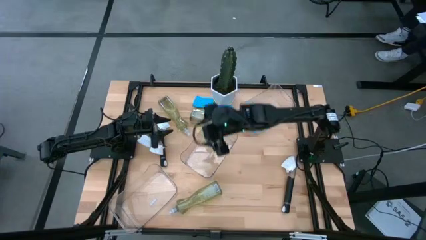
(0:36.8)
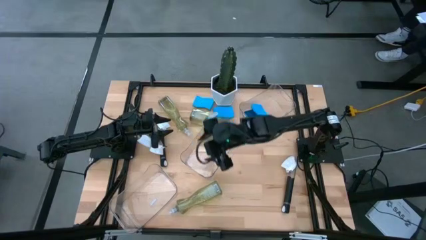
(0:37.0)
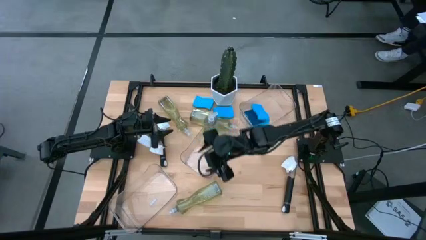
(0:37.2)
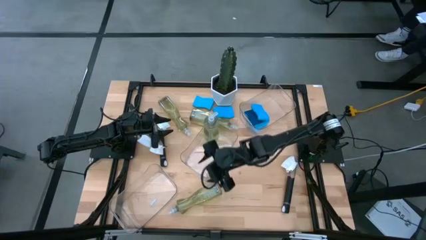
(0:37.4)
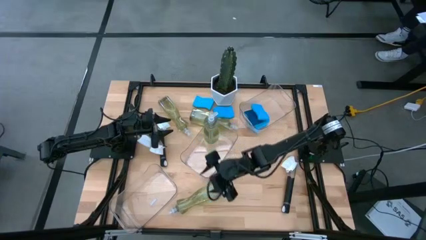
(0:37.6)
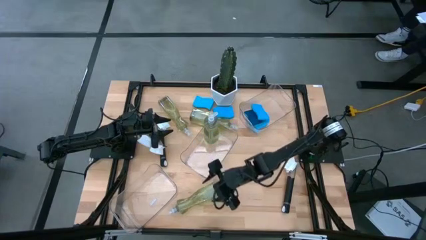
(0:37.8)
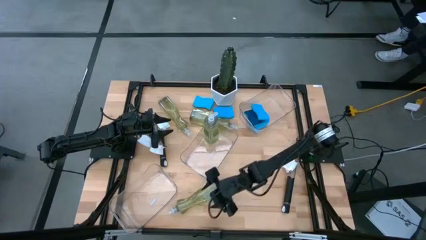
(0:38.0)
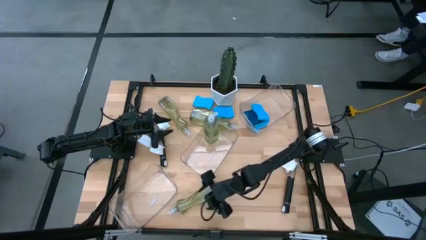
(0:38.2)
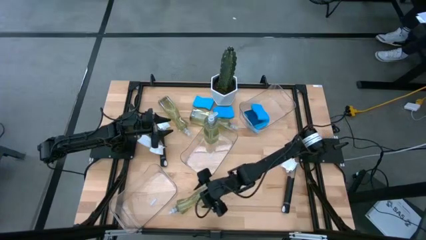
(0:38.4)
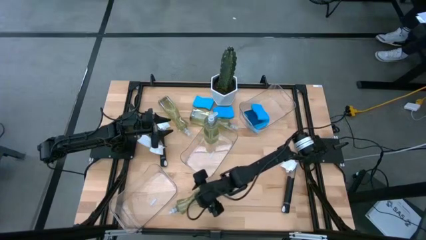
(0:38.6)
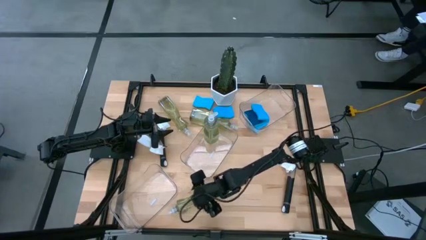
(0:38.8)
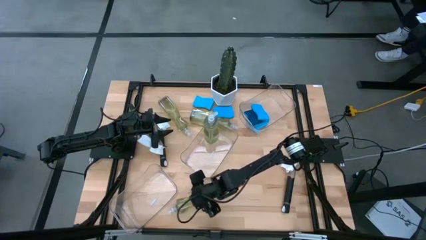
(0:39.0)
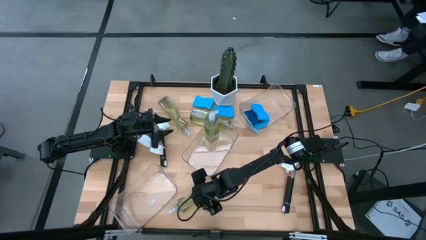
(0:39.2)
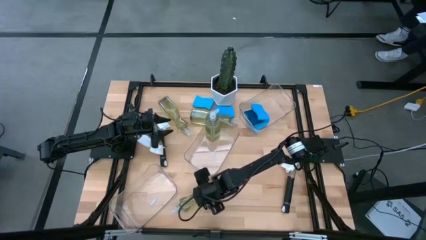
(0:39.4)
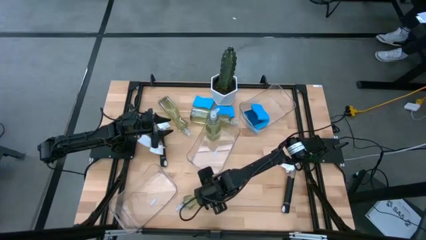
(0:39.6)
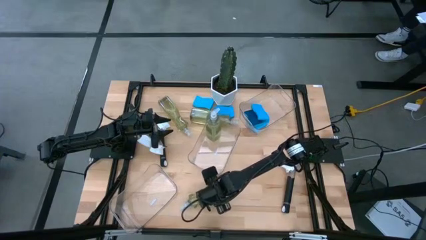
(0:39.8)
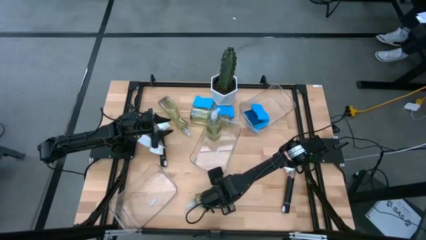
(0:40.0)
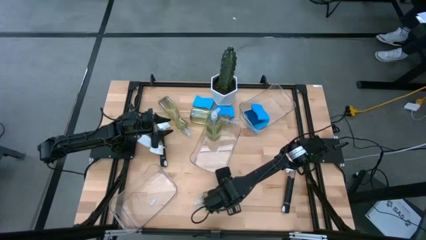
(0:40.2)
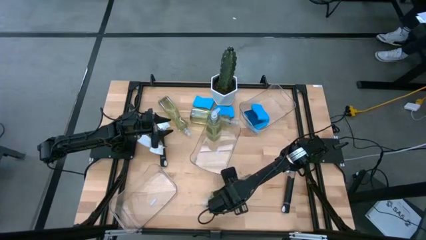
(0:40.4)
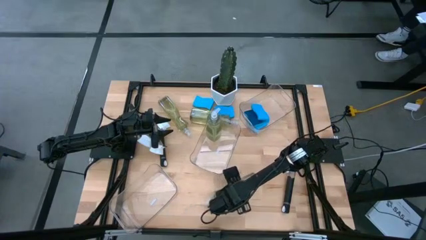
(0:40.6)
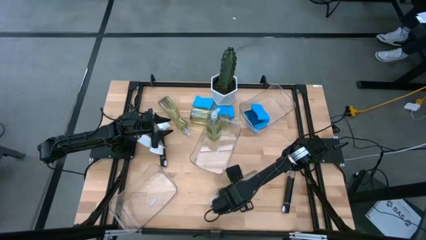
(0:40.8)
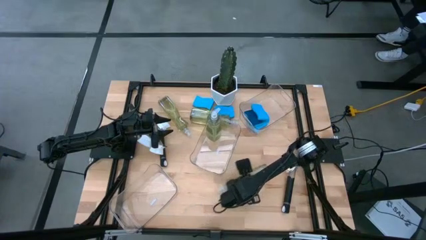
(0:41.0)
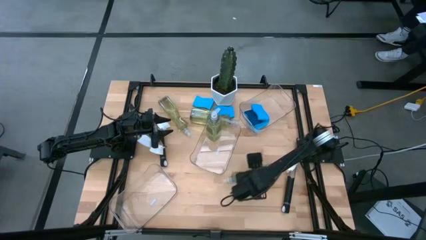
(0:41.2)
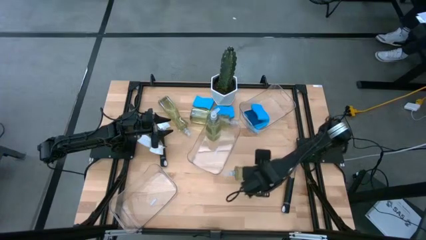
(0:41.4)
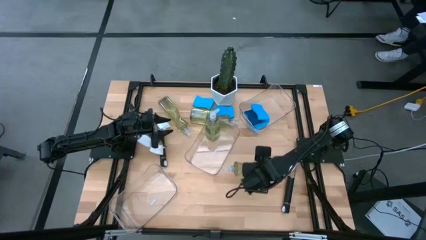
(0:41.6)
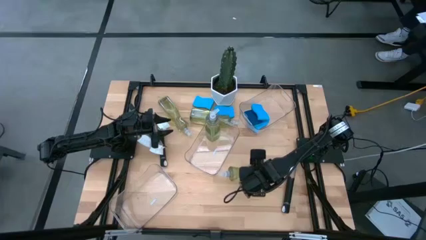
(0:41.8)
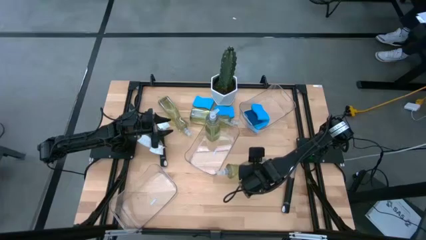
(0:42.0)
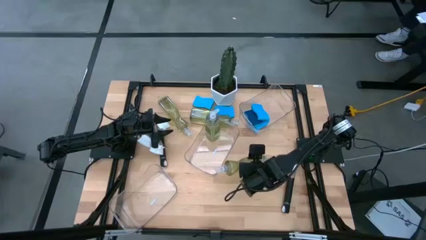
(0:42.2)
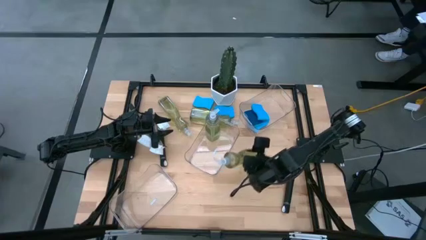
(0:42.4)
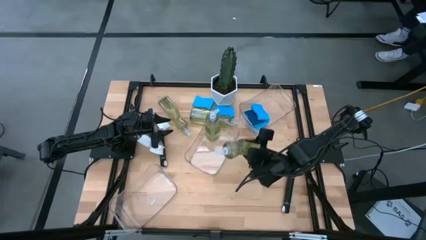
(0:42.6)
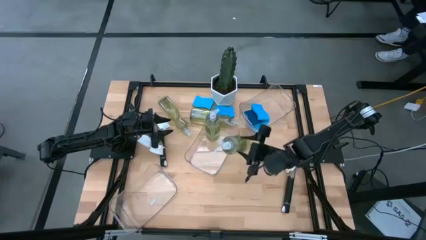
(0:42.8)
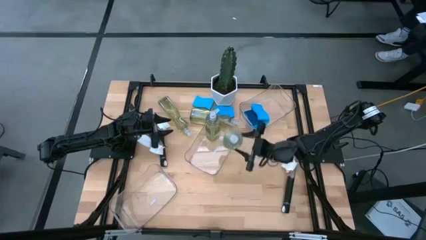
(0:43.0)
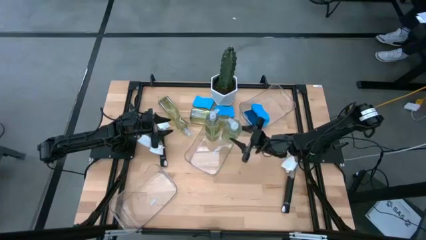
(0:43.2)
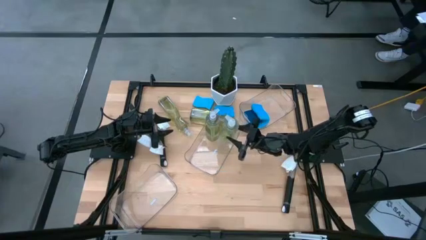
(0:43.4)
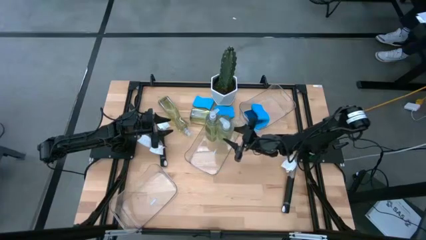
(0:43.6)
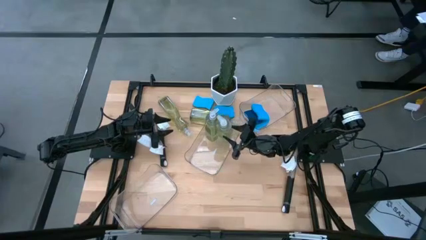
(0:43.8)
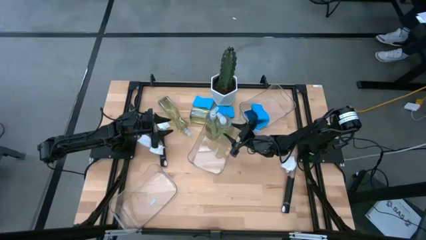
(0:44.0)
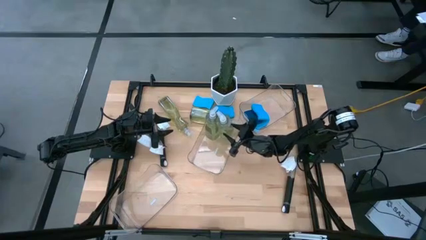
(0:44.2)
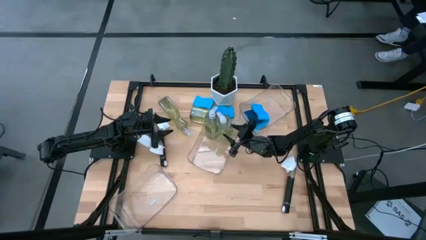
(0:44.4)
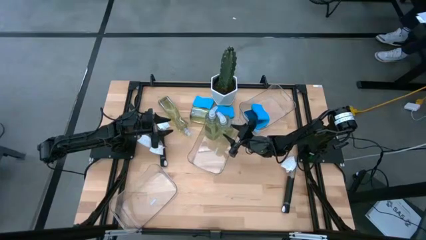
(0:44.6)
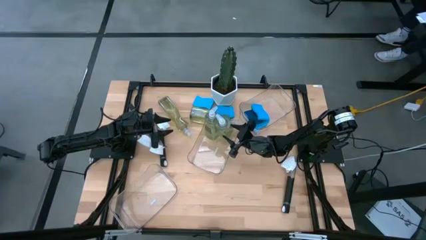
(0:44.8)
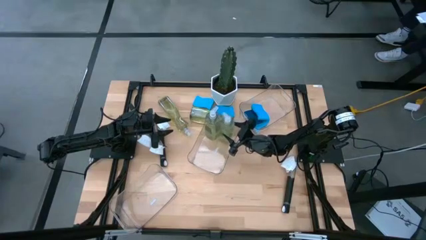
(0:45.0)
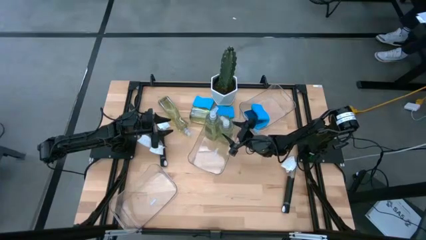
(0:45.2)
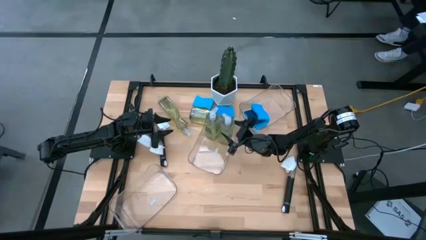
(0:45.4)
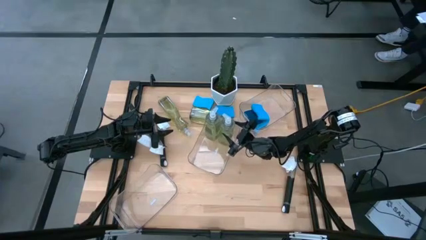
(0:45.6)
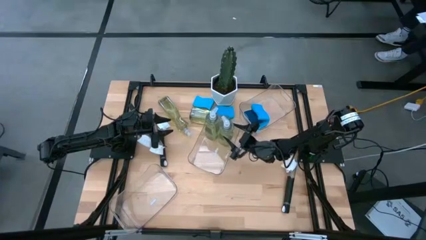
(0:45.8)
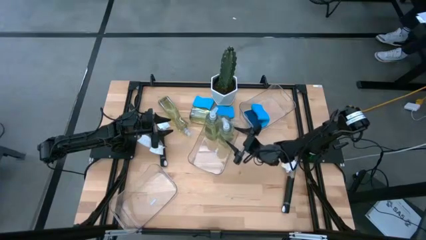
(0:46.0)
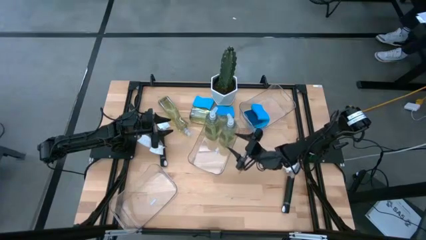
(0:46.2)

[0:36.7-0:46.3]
Task: Pick & Place Kitchen Sink Supplies
Put the green soap dispenser into the middle transparent bin

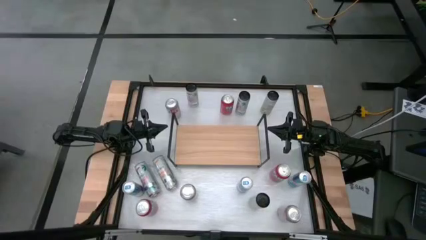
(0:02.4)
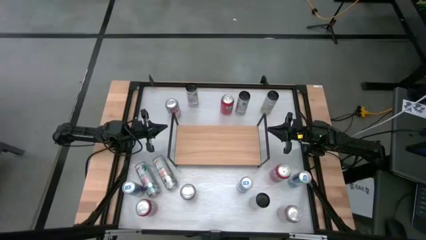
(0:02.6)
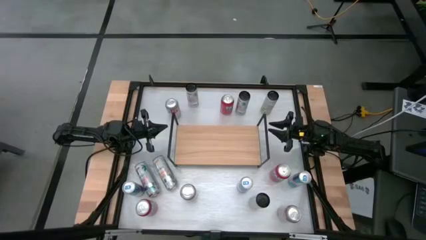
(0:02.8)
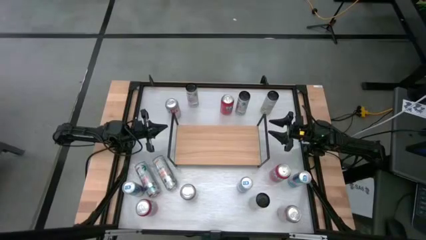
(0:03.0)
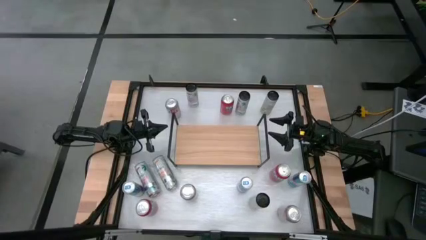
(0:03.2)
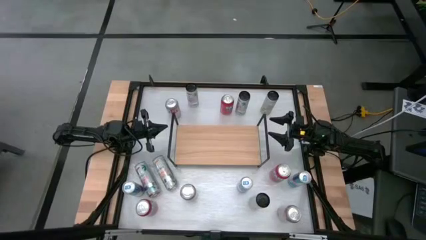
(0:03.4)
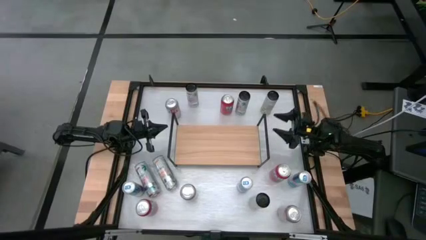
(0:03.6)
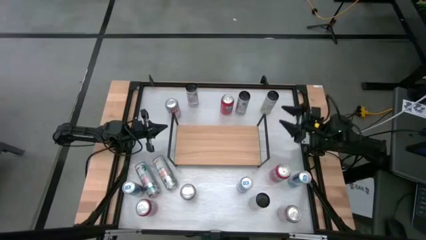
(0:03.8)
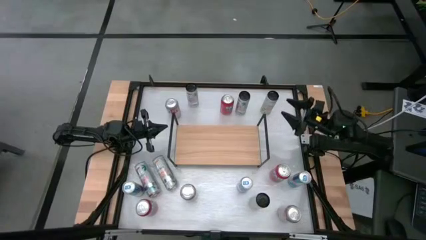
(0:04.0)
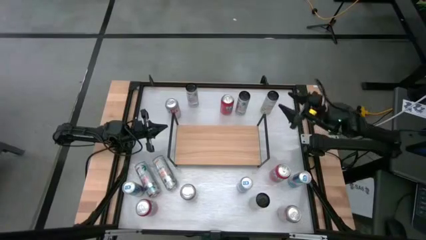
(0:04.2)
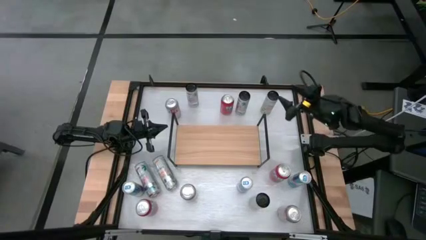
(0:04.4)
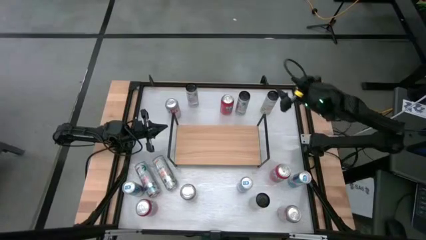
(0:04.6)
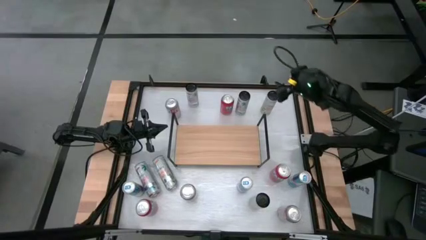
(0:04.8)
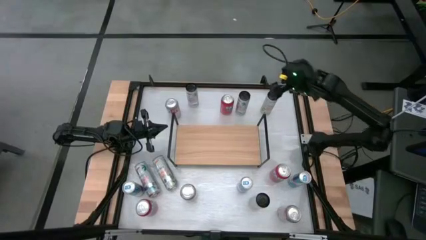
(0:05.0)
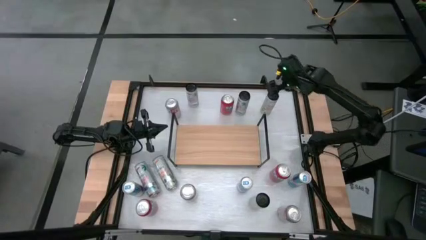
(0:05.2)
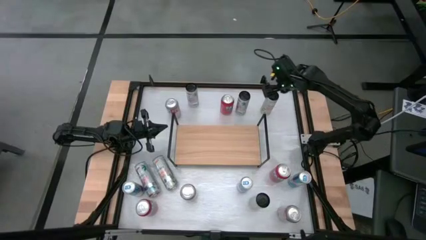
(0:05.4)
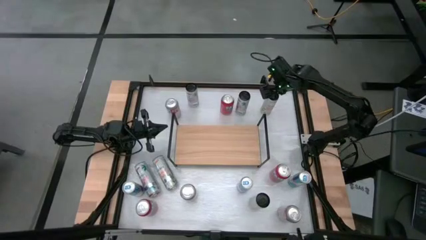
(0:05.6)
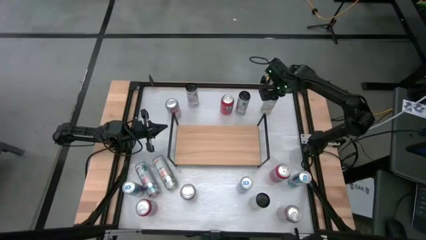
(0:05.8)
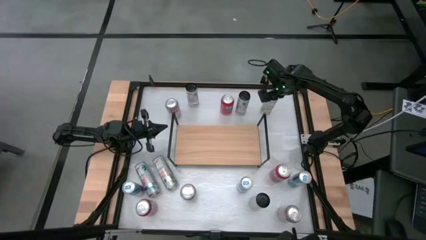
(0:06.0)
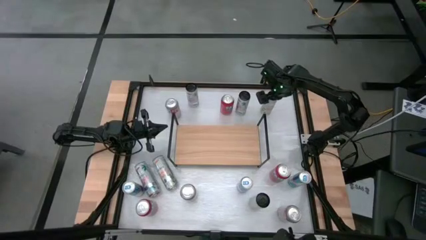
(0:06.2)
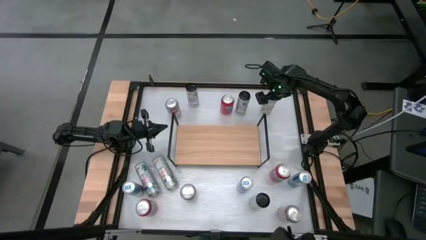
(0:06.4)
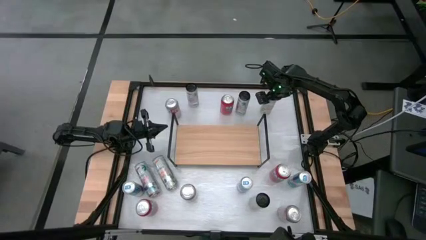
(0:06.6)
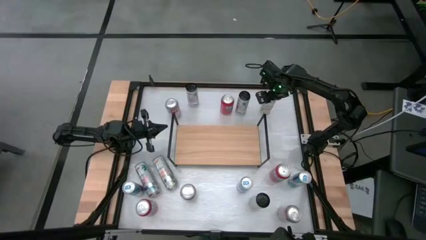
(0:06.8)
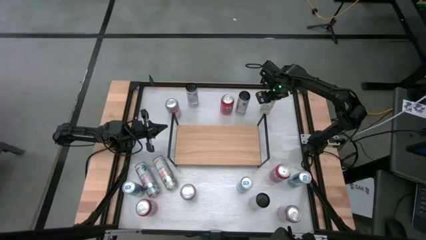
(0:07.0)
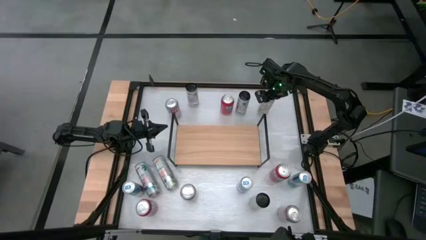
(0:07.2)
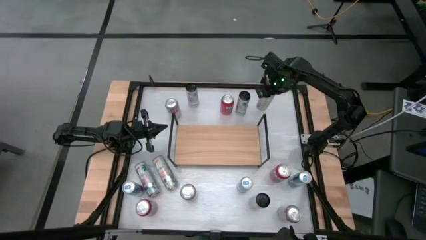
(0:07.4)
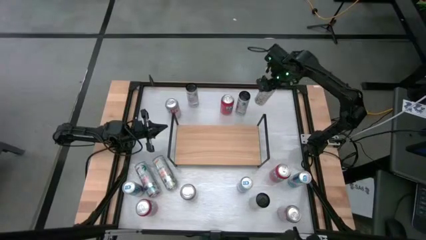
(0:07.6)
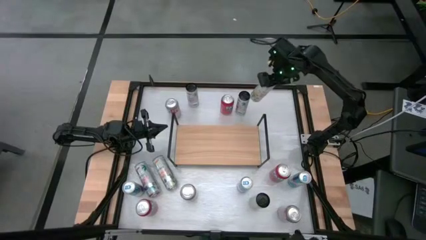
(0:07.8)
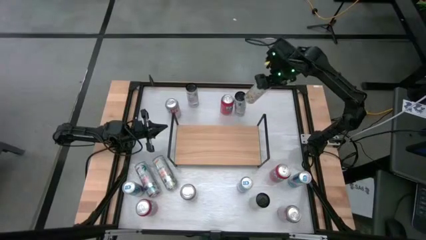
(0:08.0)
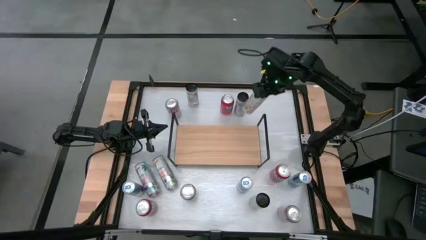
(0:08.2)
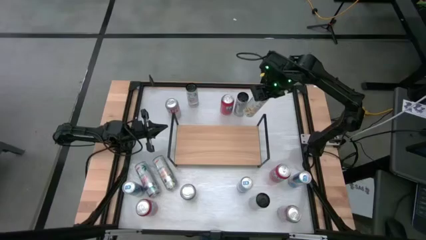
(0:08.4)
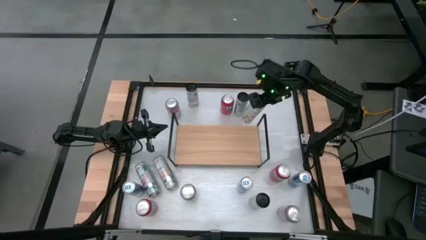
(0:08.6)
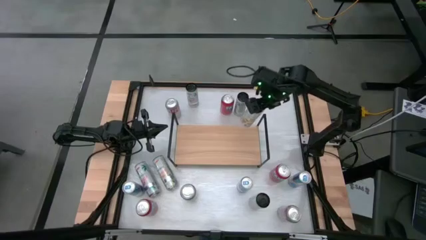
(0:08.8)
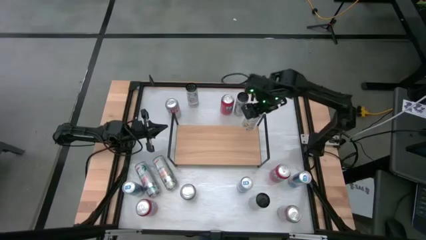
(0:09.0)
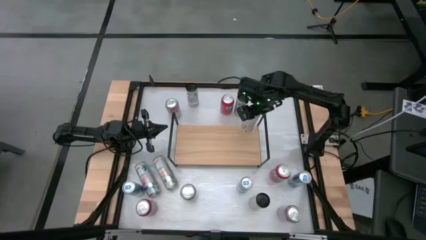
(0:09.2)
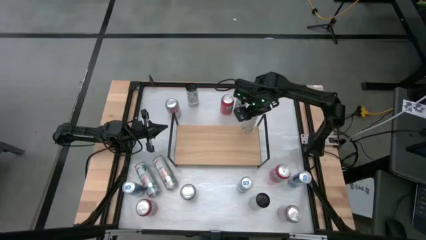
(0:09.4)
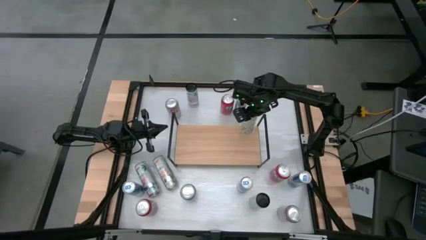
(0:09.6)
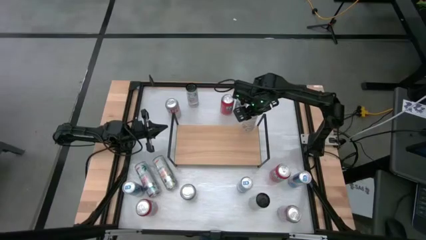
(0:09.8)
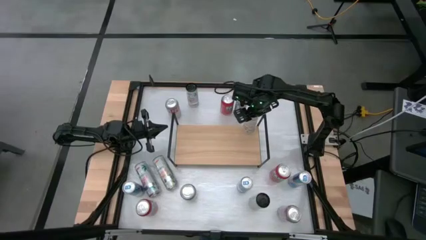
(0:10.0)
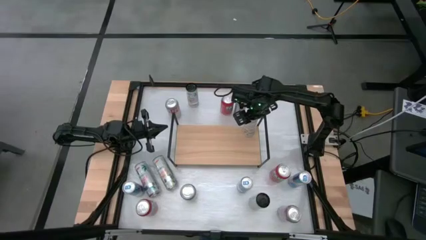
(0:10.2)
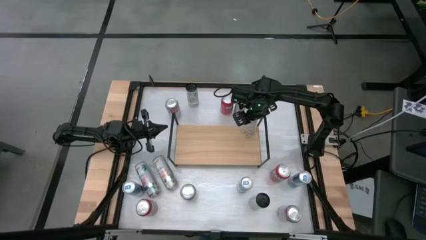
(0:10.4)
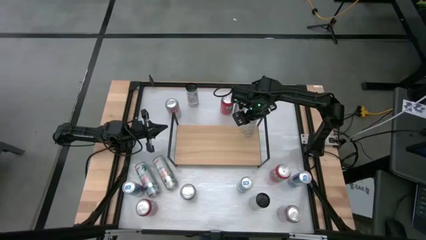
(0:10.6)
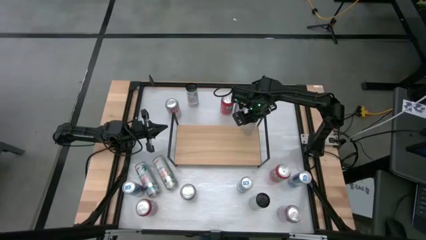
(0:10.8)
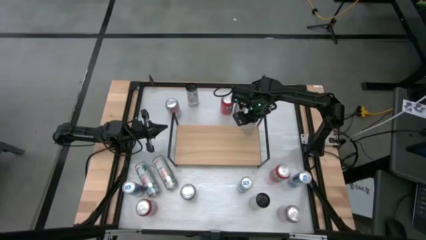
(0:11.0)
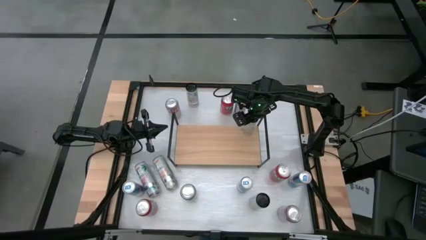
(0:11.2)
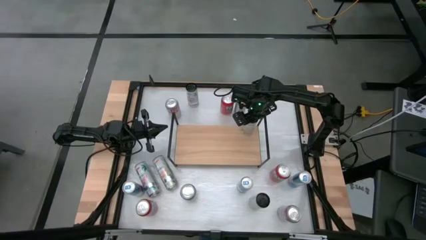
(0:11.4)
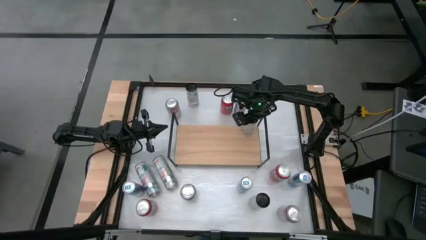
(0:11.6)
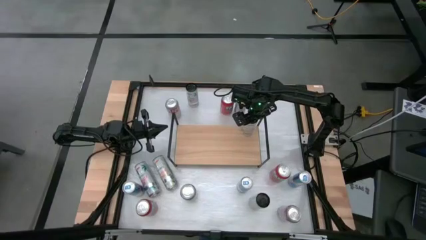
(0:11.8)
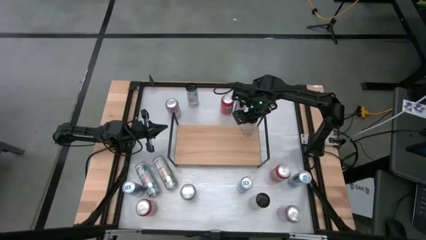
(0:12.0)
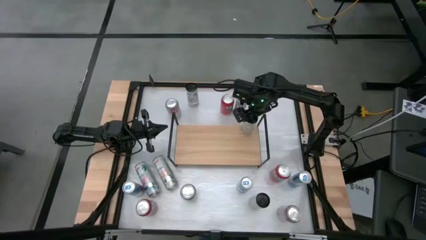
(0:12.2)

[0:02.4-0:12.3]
Task: Place canned beverage on shelf
Put the top right white-yellow soda can on the shelf
